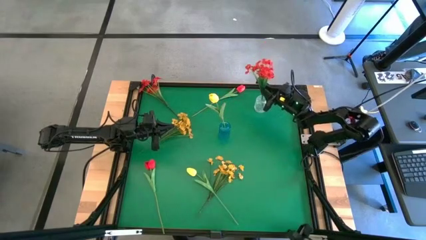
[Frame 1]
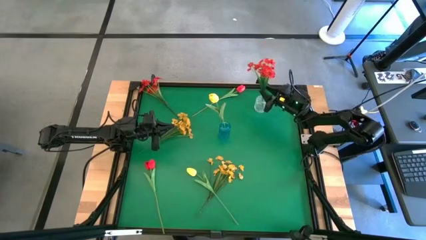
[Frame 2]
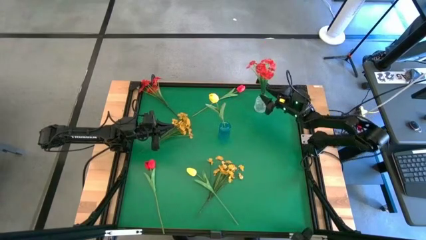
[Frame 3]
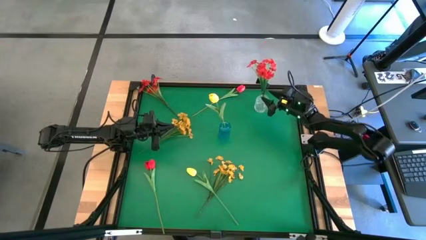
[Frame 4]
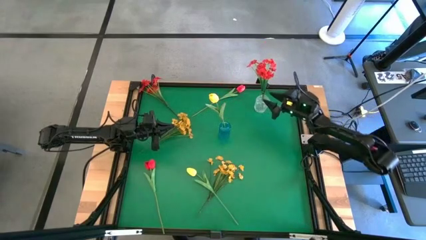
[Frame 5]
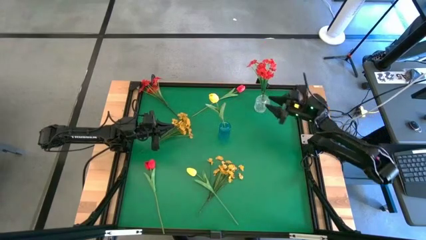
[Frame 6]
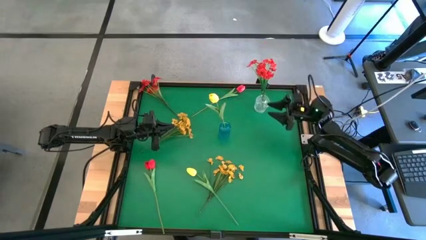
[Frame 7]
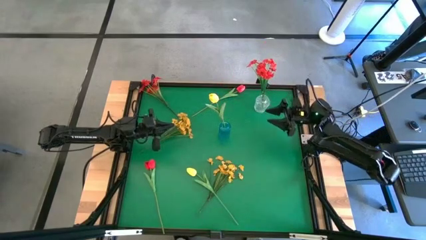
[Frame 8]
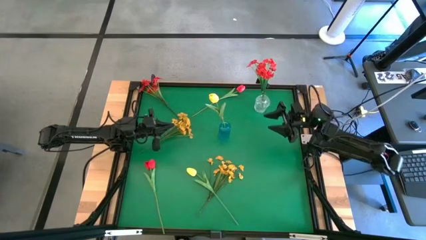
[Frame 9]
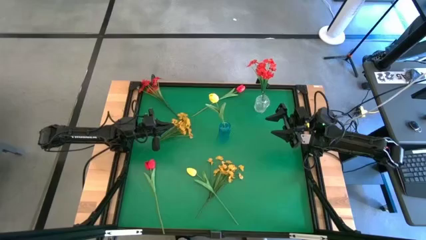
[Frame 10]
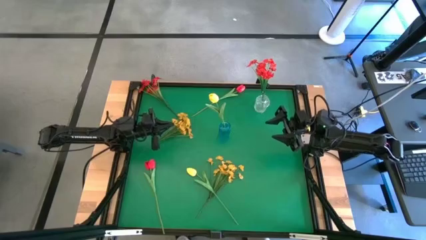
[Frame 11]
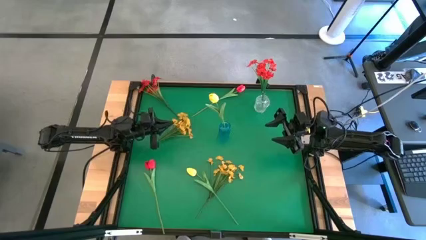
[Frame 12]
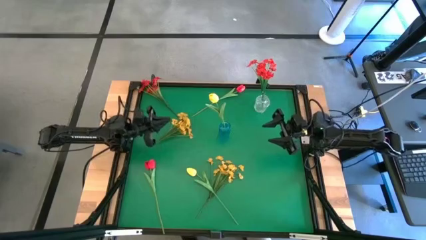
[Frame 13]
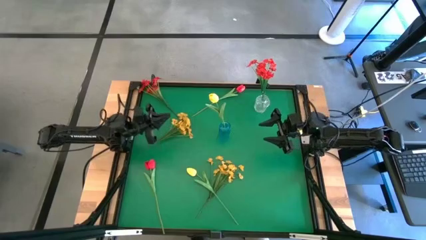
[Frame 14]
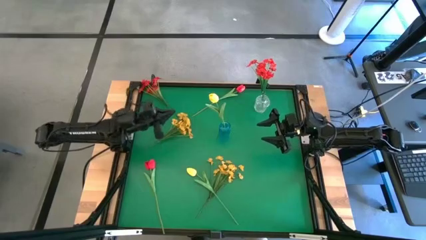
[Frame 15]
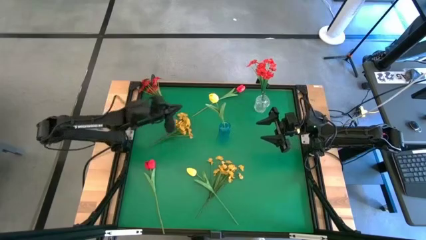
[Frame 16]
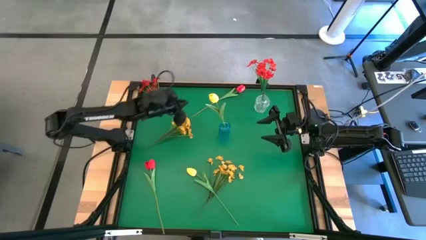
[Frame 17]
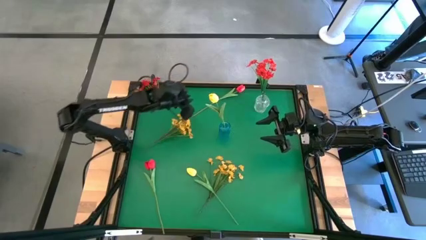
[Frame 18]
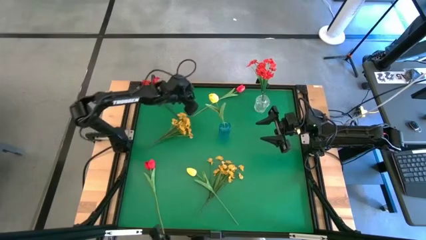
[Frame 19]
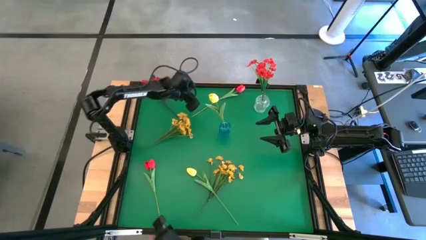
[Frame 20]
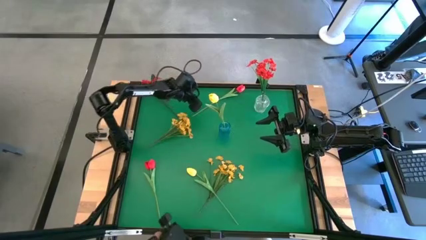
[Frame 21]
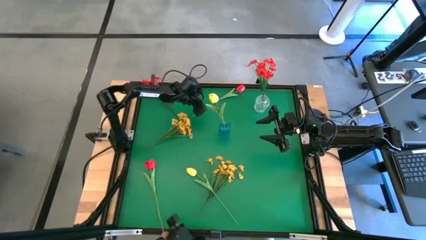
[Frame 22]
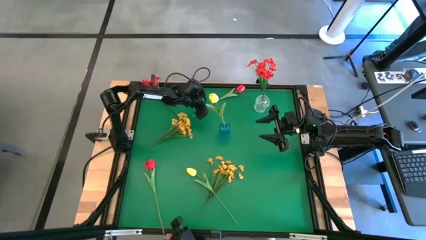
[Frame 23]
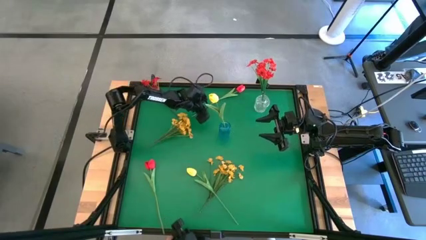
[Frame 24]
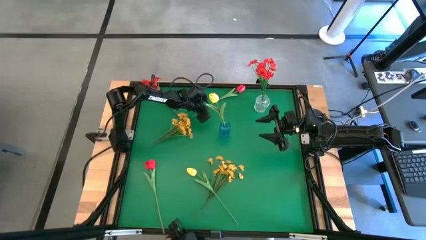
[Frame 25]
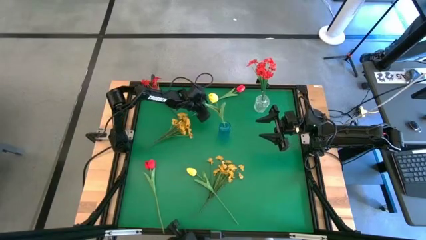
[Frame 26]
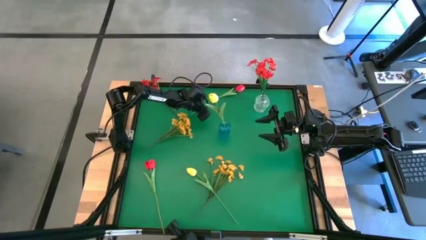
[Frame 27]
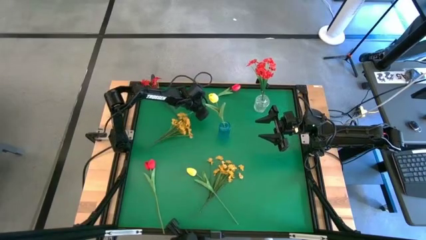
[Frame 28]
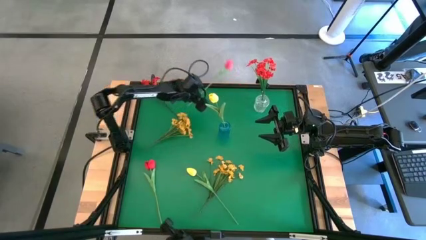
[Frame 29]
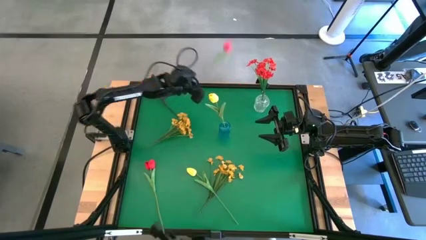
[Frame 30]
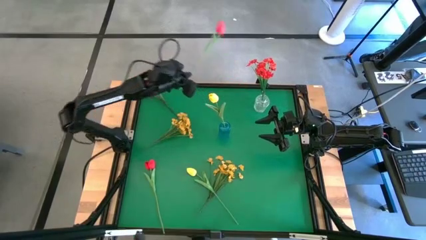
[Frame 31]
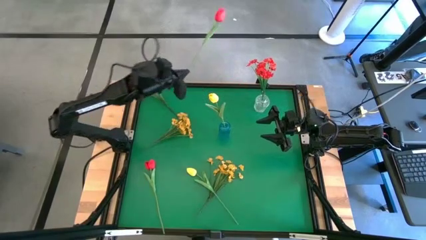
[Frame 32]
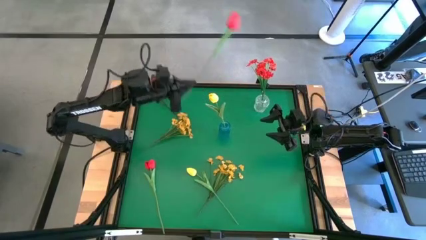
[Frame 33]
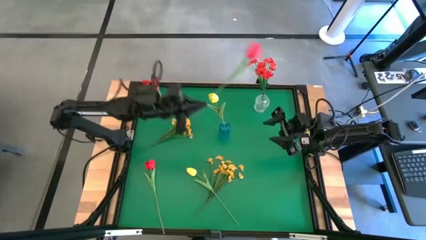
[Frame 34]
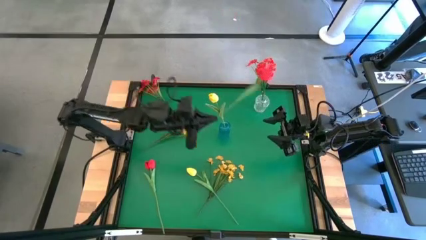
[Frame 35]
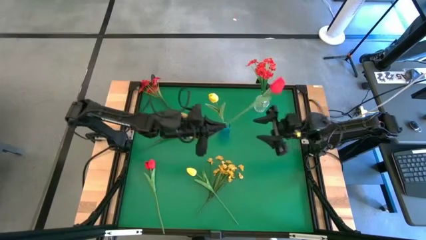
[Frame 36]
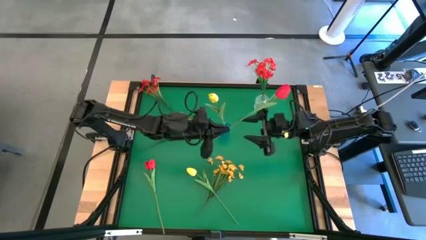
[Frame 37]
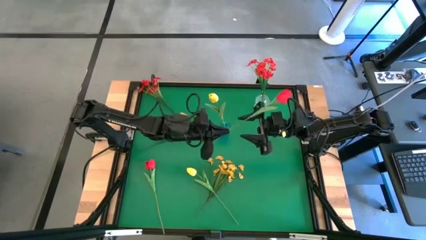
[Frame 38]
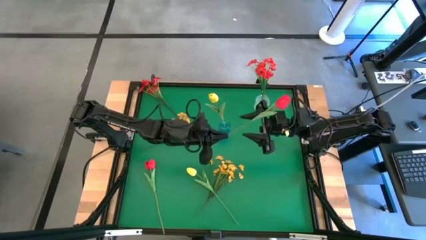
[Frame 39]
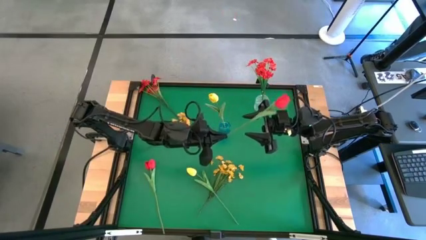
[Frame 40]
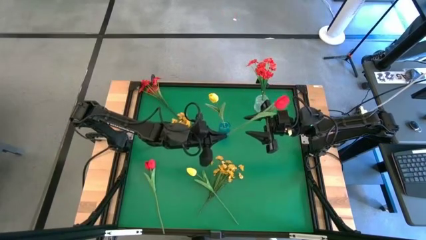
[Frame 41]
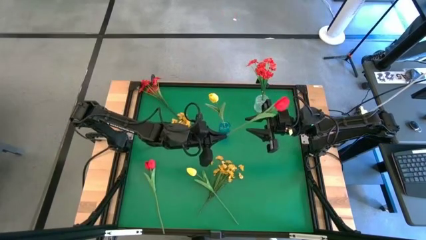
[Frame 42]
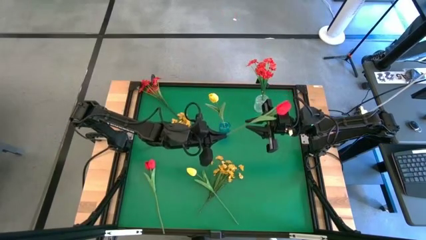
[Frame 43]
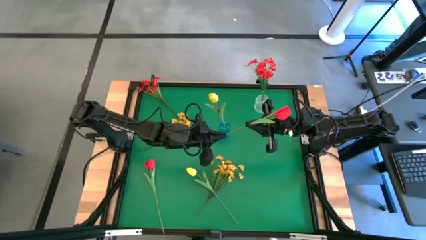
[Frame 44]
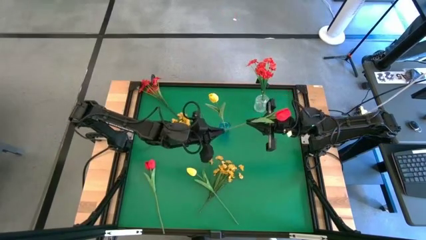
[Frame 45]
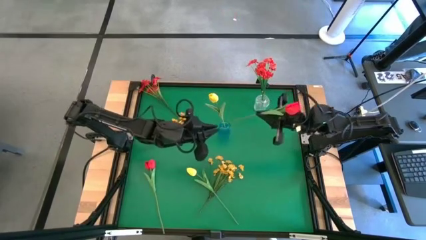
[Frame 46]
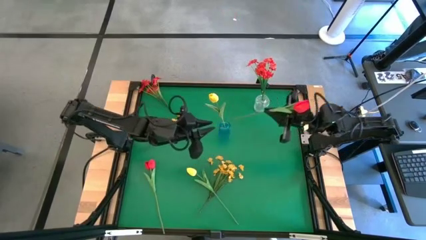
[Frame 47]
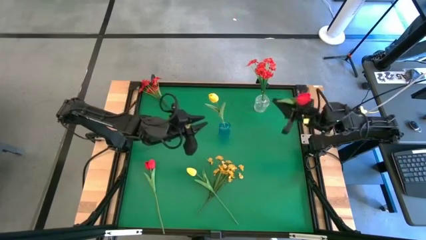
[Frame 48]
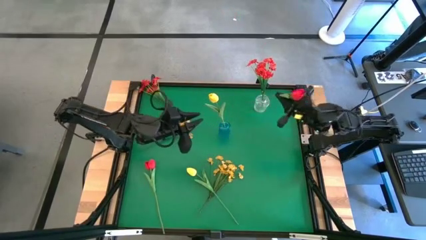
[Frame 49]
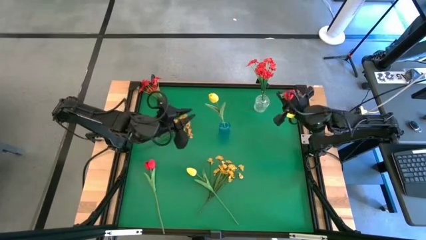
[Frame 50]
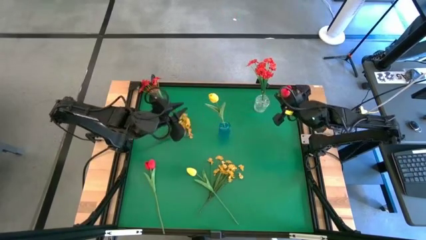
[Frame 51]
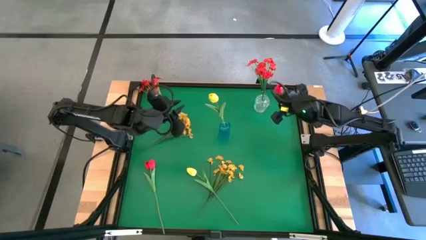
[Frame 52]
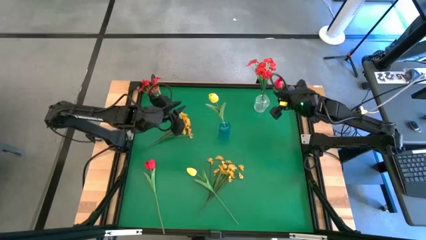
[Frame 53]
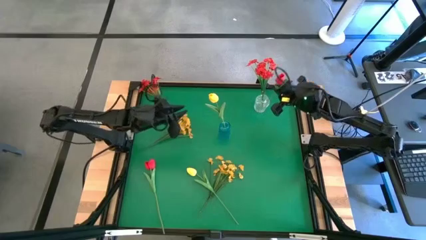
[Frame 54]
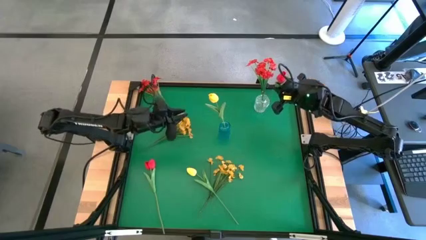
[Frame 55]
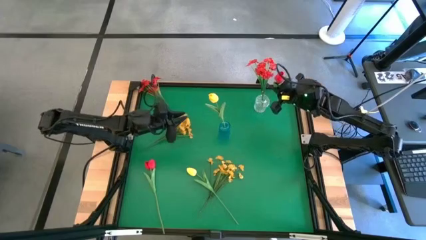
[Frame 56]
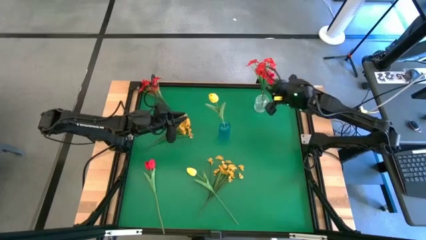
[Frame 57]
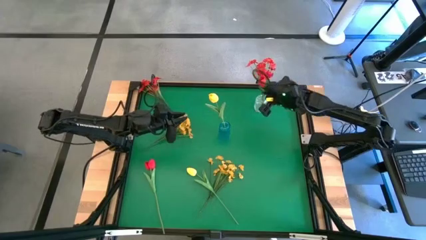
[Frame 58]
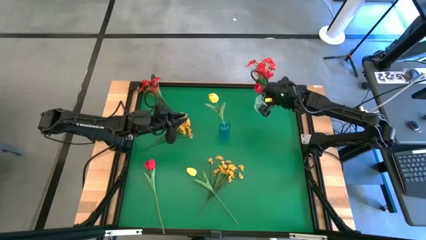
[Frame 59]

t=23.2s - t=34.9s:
Task: Sort flowers into vase by color
Put the top red flower into the transparent crystal vase

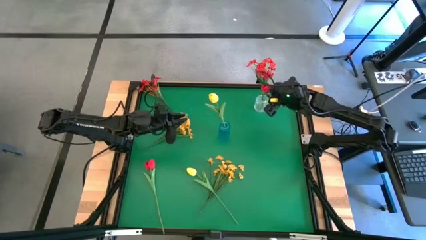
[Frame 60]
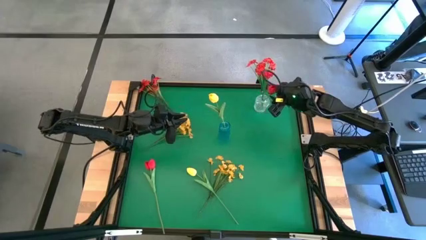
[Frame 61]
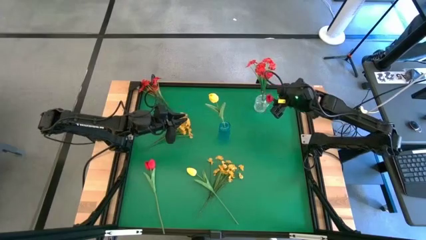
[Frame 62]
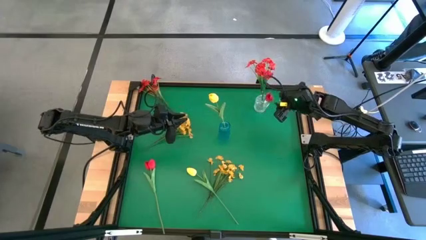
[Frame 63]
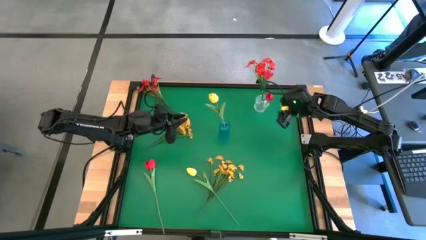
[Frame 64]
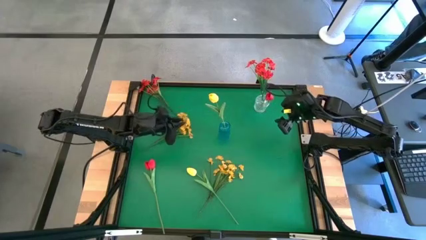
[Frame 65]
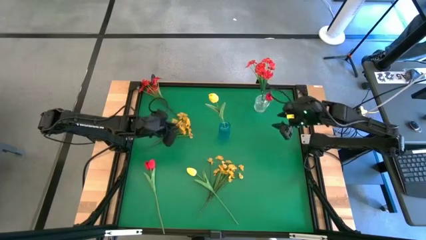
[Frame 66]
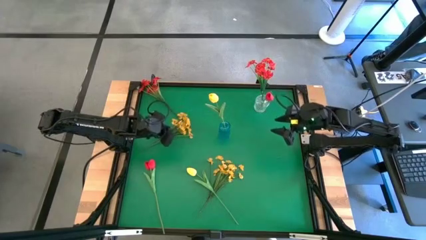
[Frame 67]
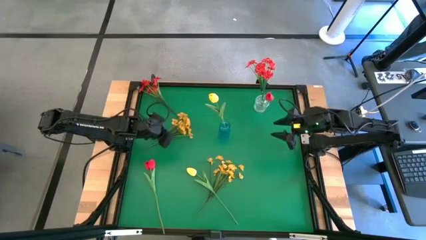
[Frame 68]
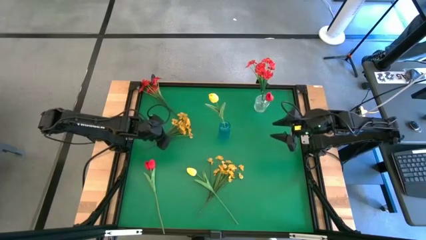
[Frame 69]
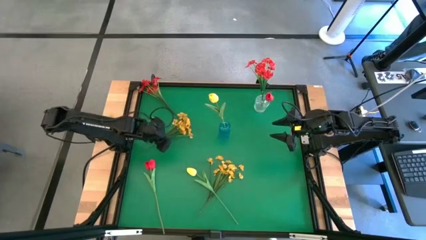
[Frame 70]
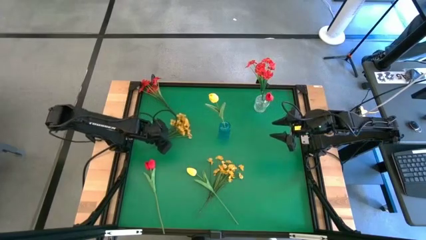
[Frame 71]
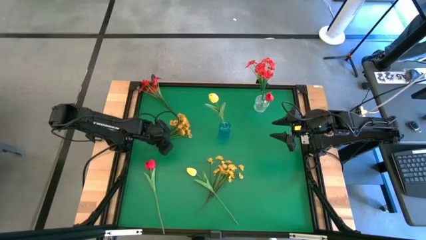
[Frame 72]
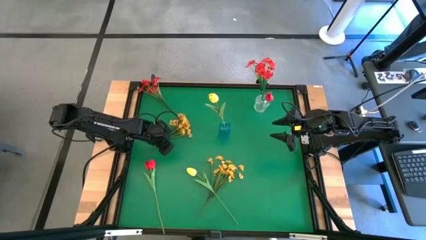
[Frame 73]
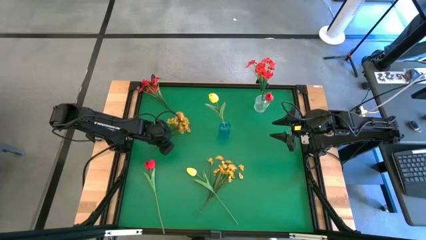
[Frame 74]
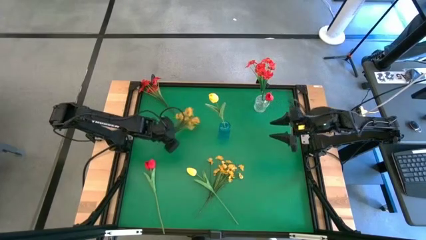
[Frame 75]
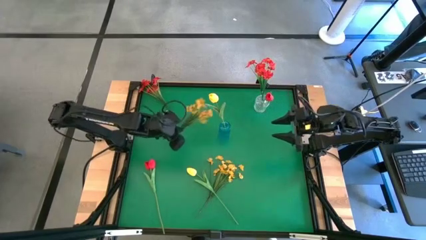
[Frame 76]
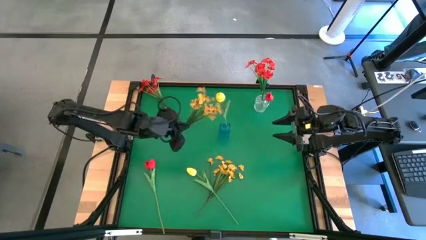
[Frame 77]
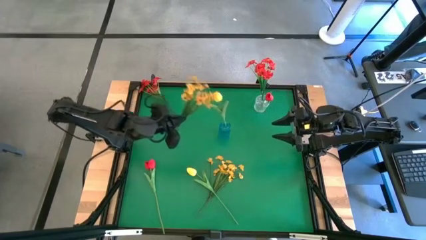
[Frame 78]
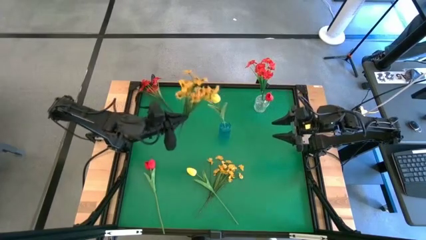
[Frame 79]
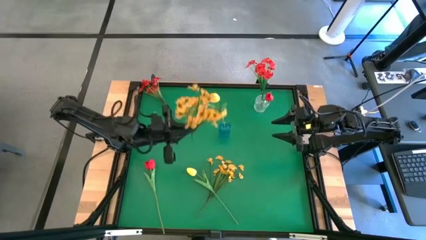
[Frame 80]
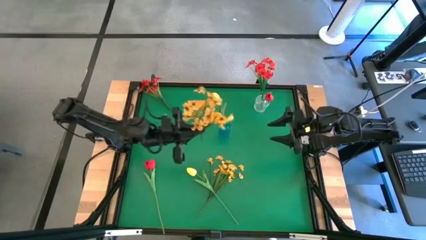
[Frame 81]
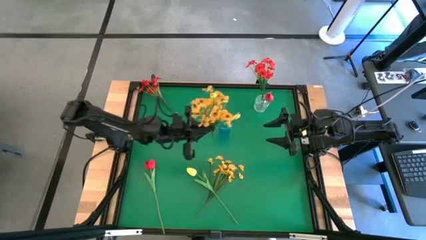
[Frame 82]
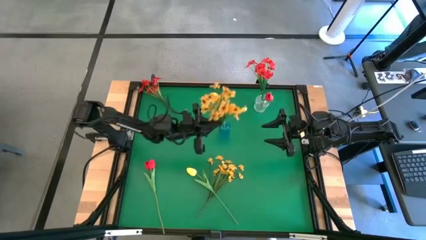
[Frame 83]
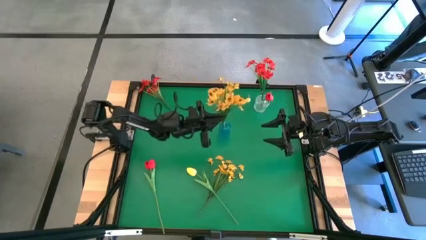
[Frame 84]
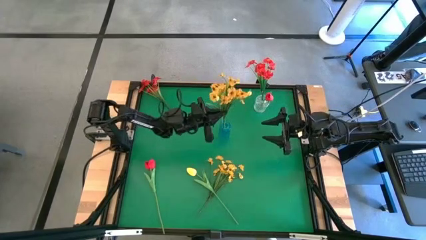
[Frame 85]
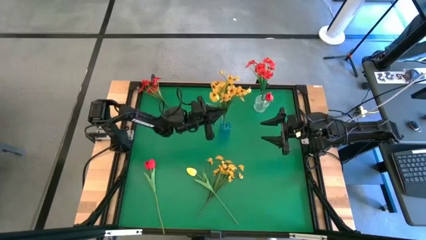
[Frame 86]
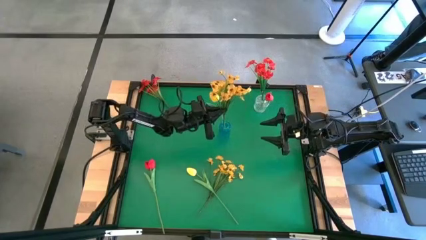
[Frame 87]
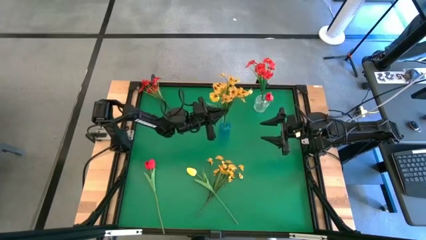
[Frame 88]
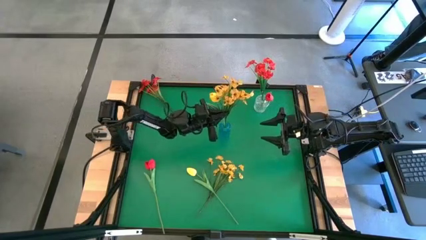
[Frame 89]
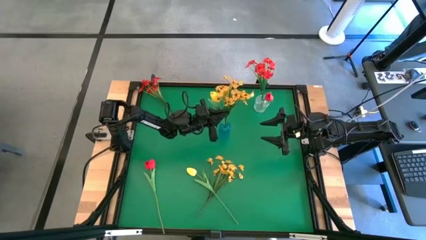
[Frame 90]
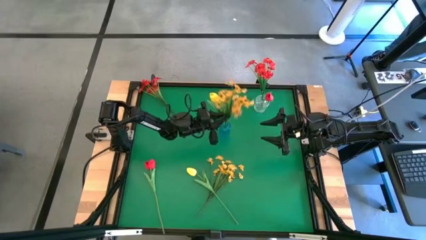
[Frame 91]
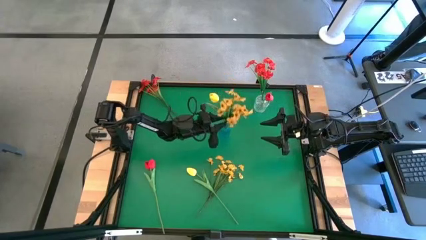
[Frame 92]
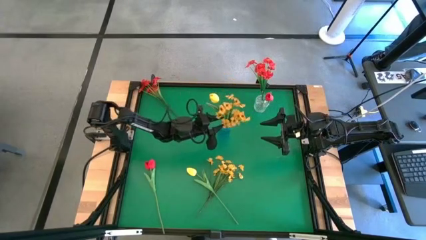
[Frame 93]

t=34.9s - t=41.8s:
Put the top yellow flowers into the blue crystal vase
